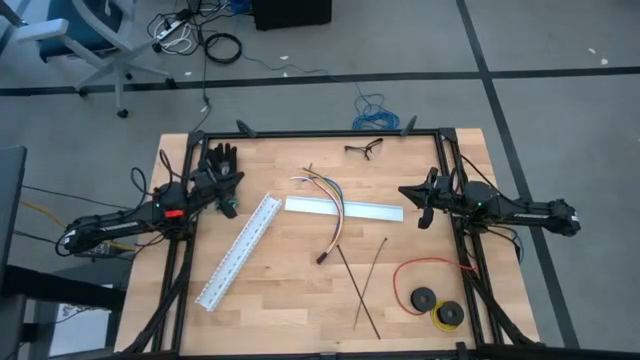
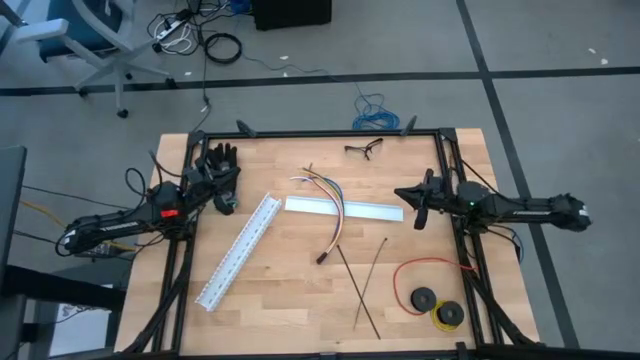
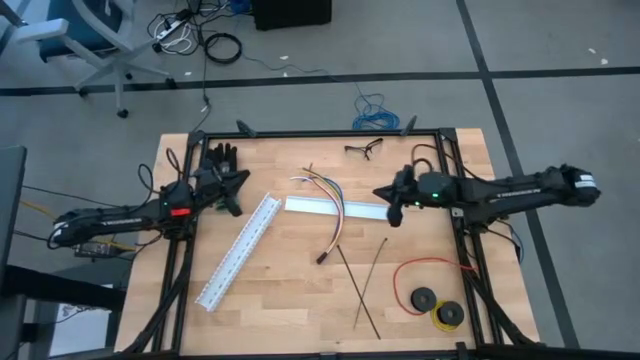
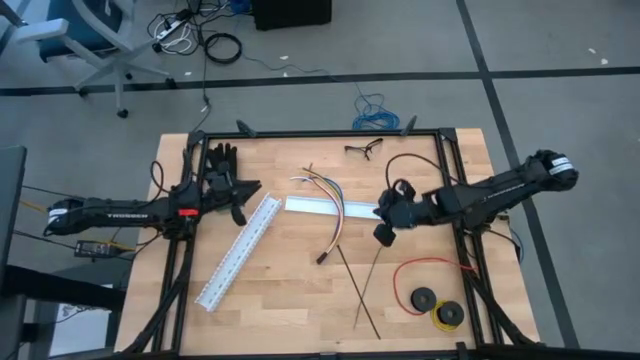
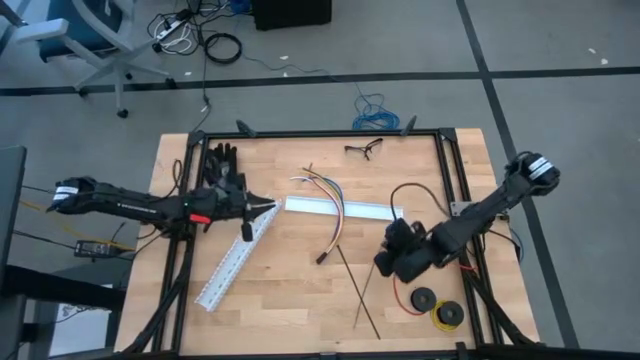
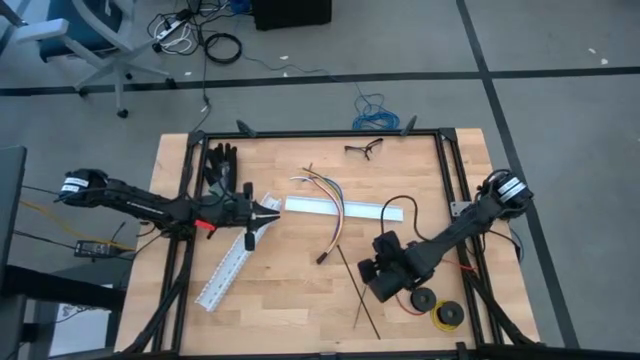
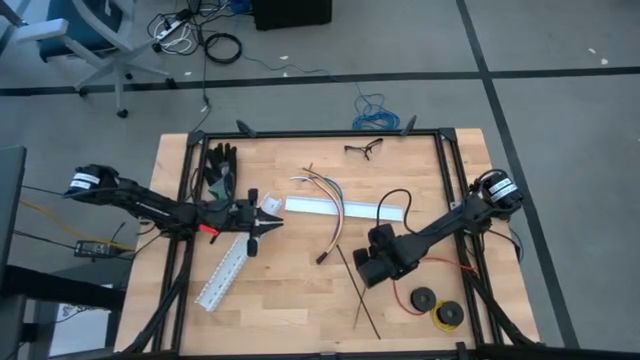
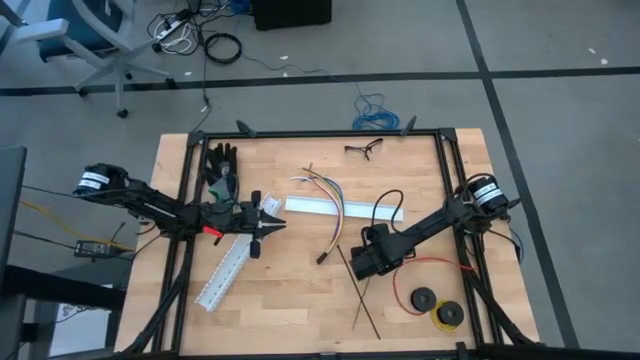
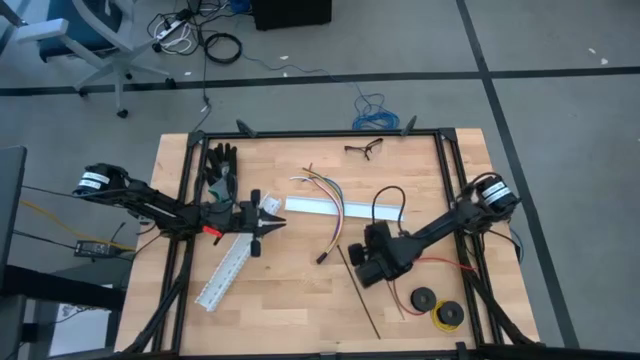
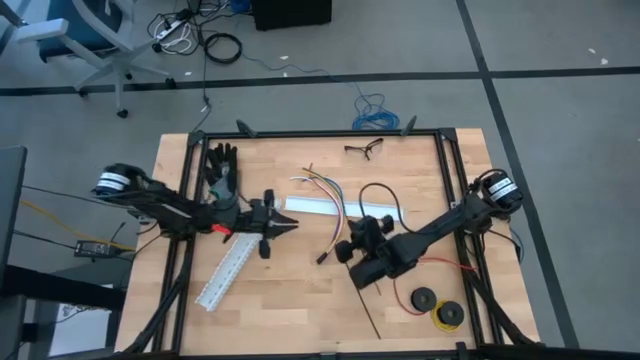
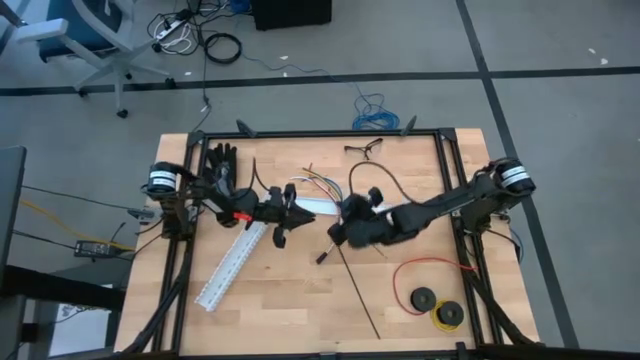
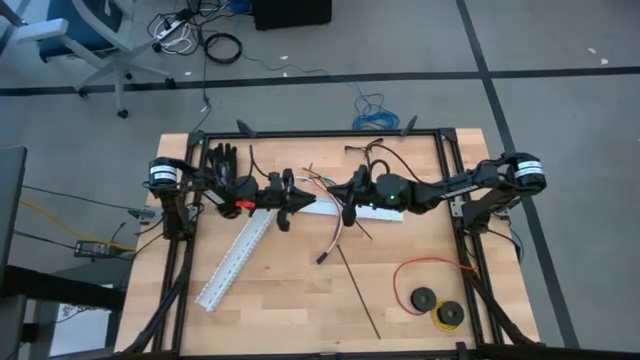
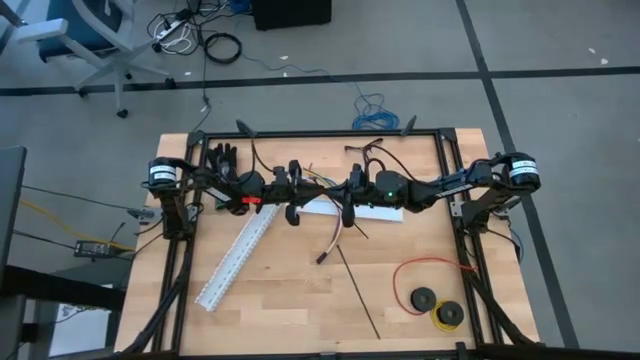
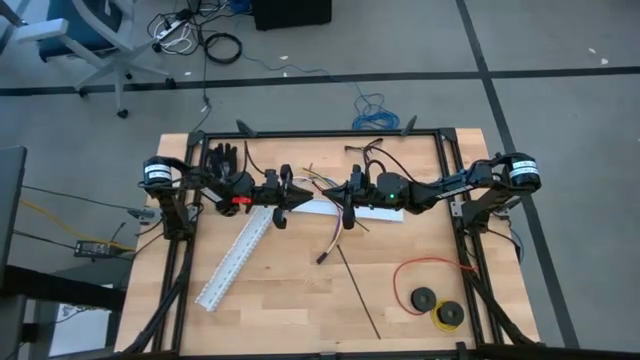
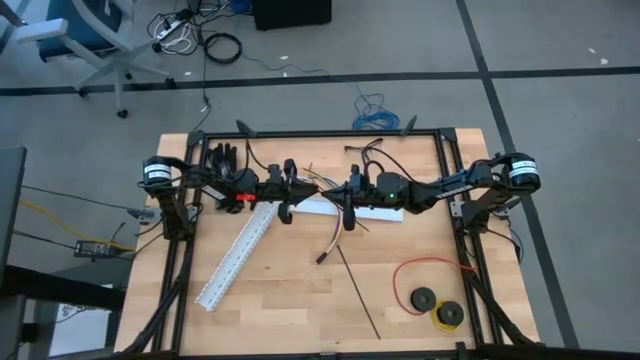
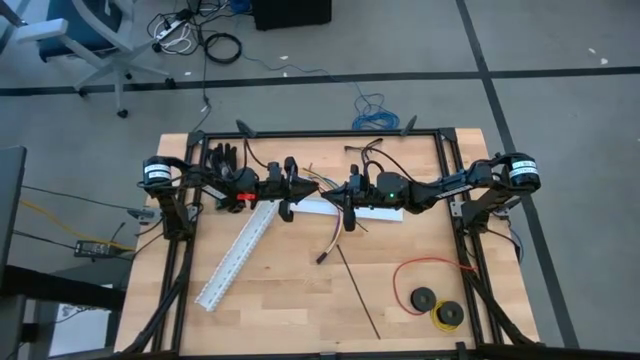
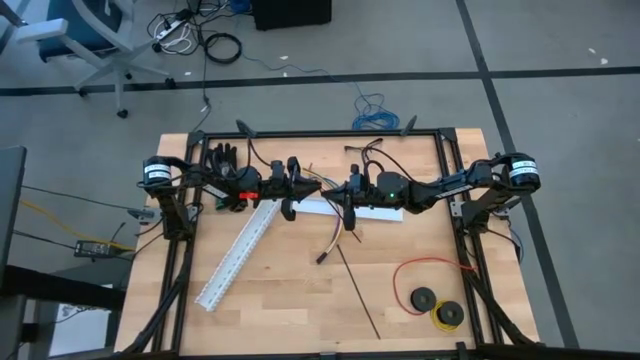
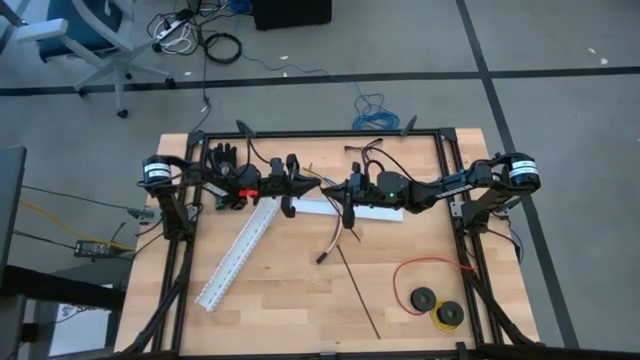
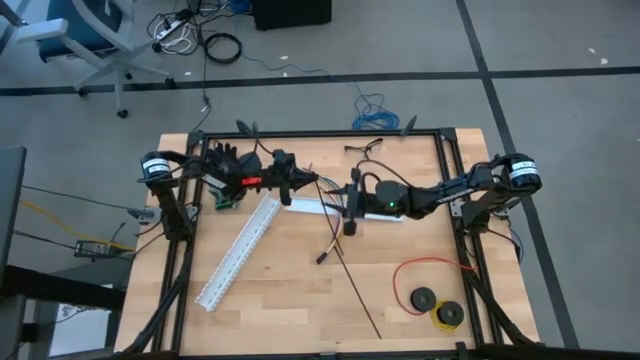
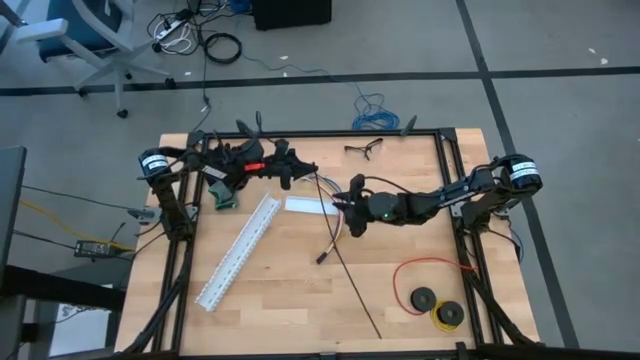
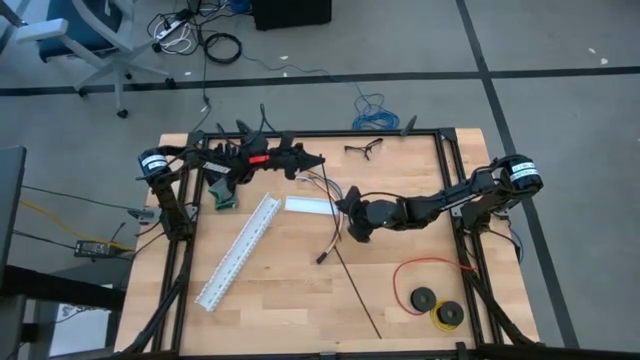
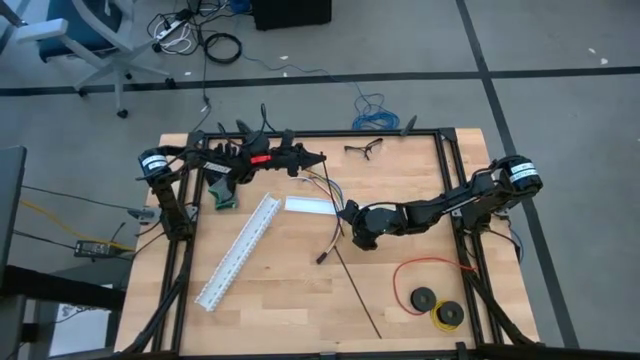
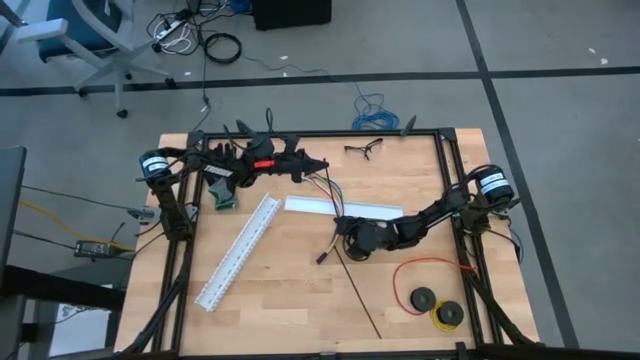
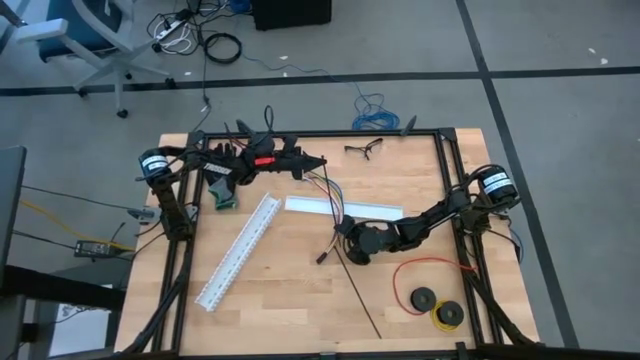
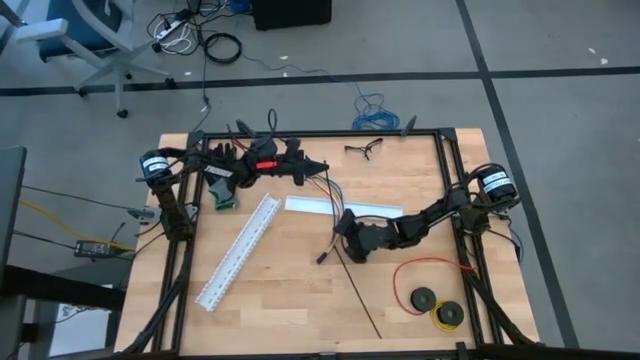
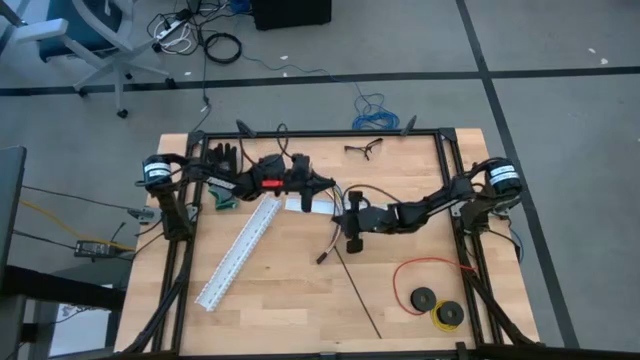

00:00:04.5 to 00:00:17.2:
Task: Ziptie cables
Wrap the cables together using a black zip tie
